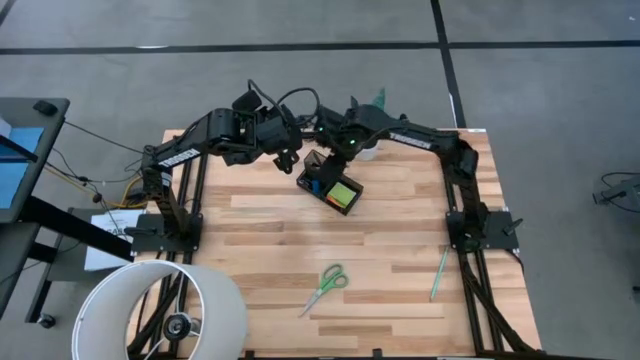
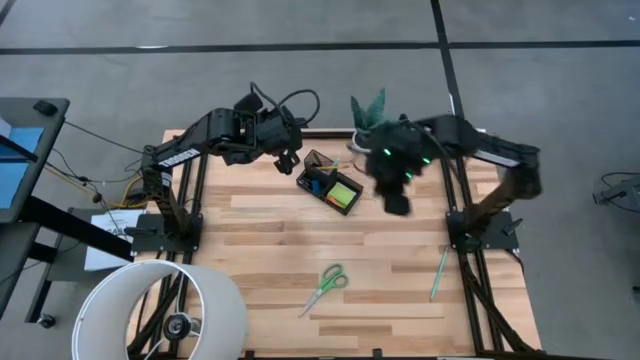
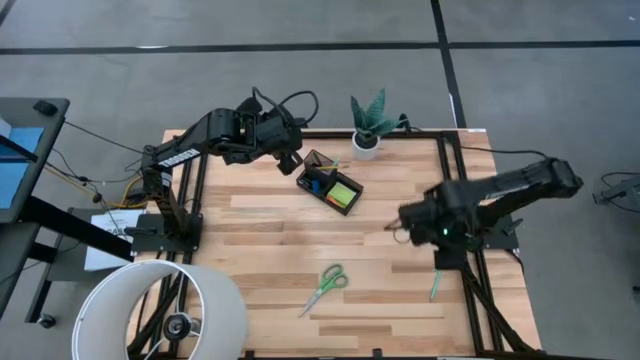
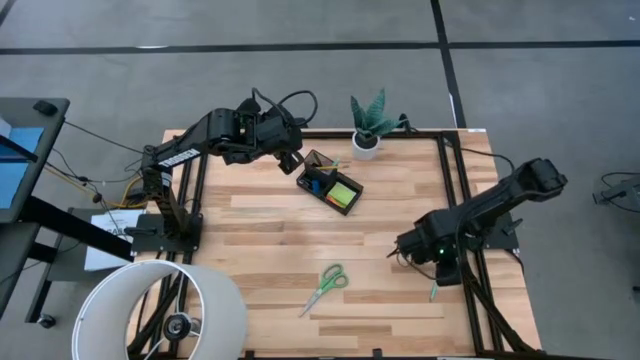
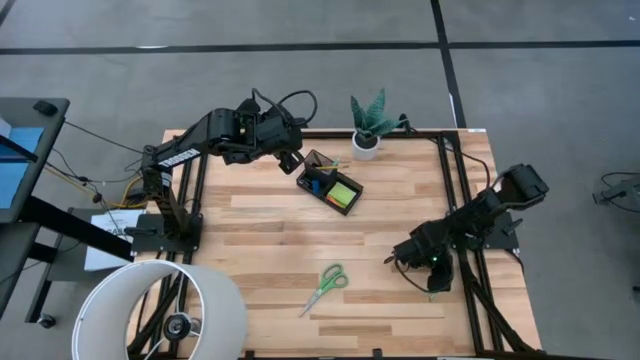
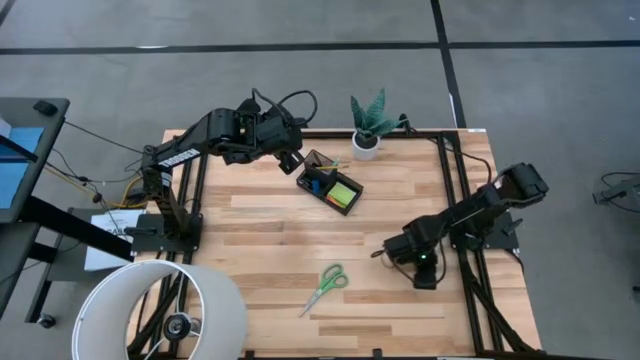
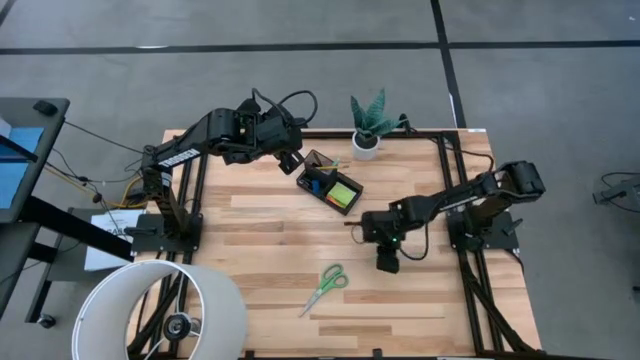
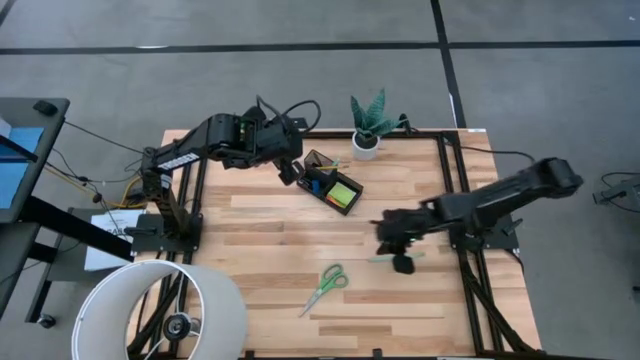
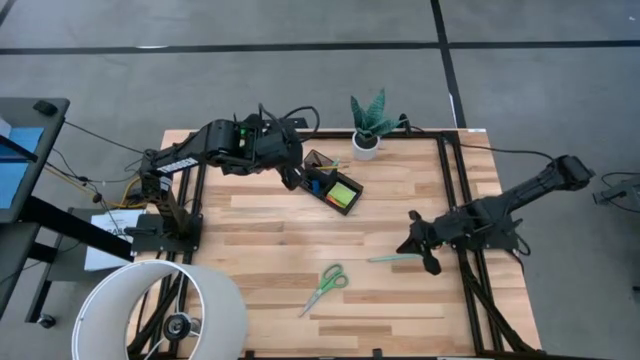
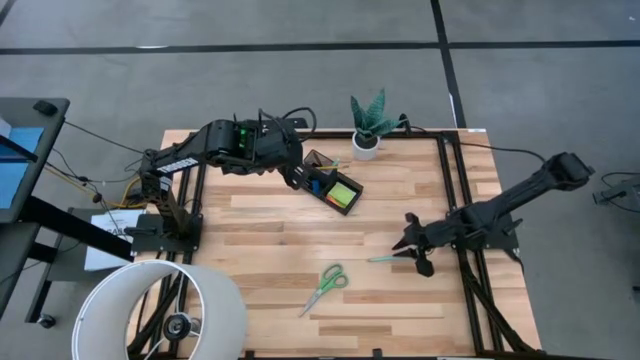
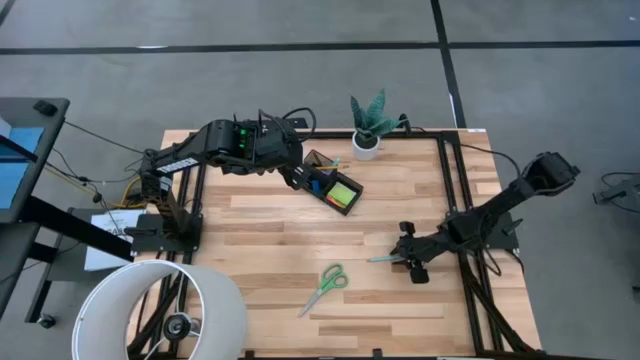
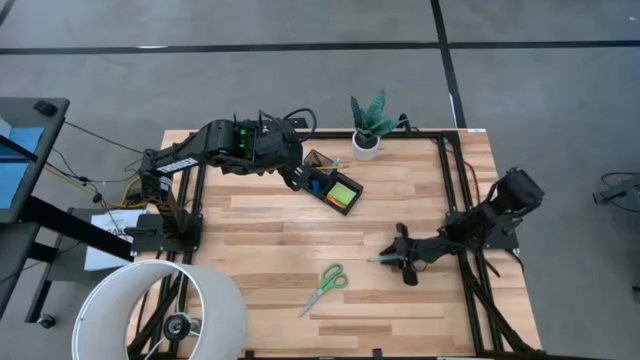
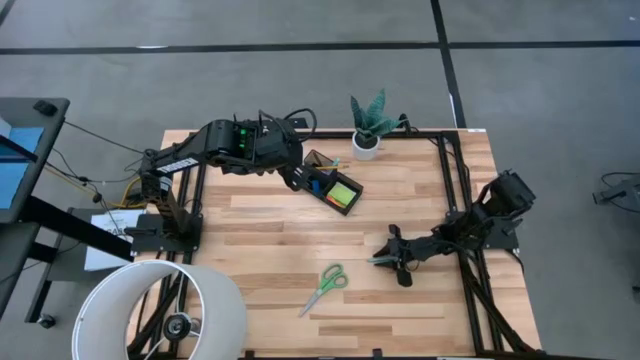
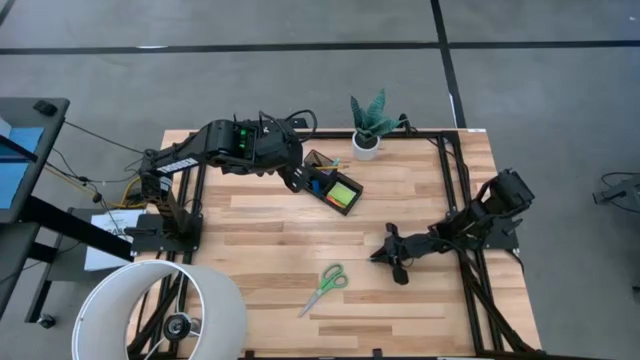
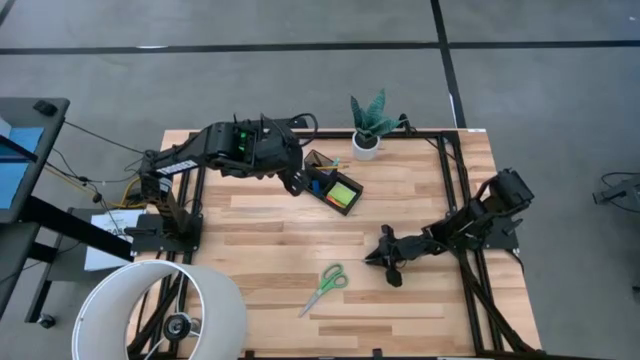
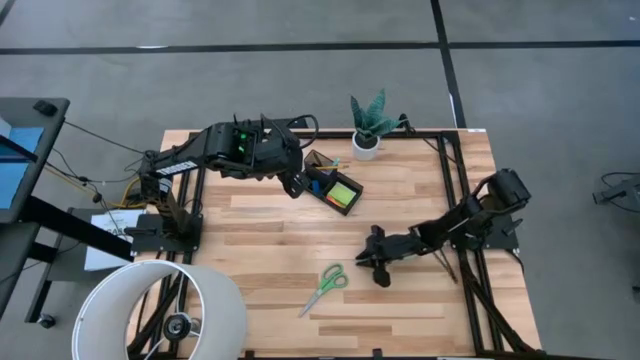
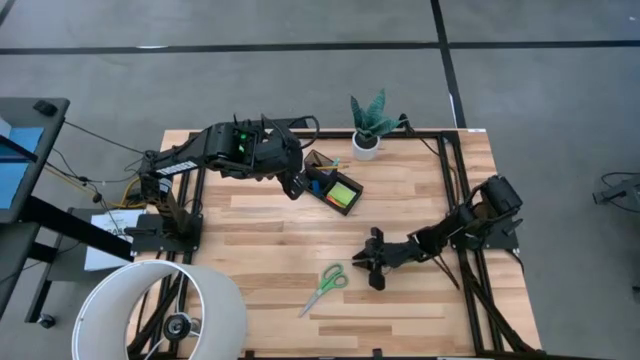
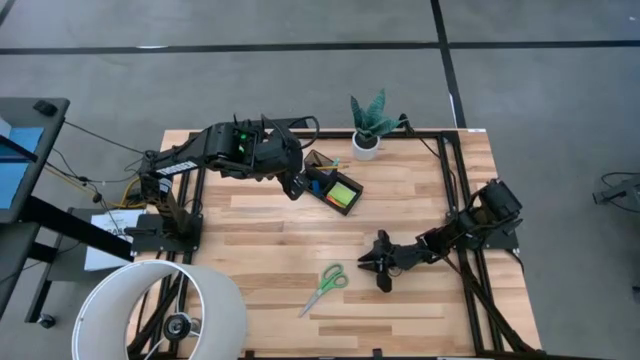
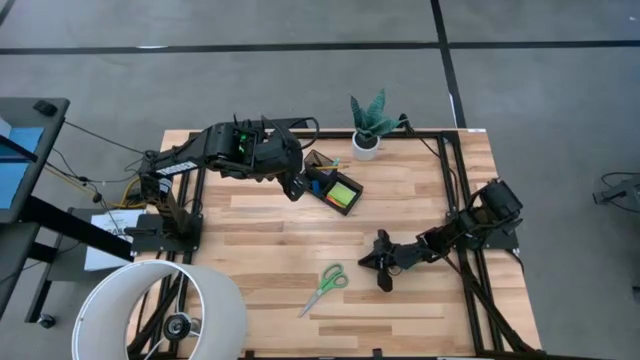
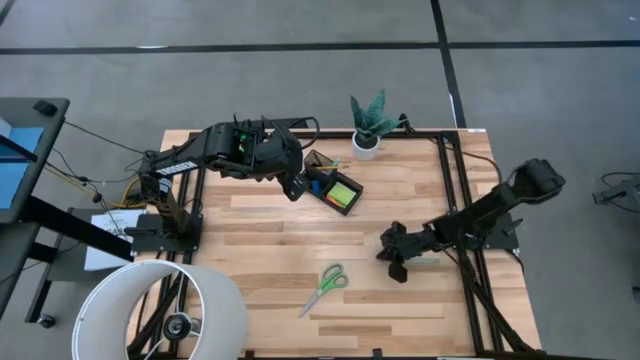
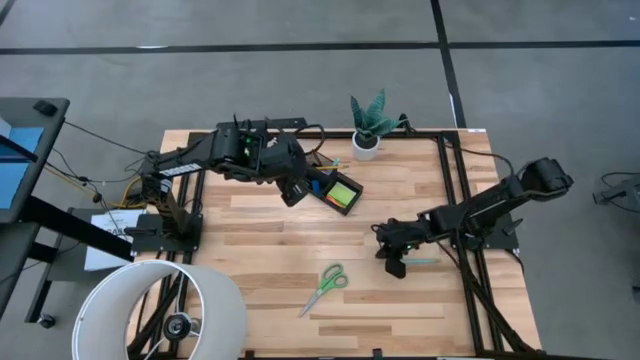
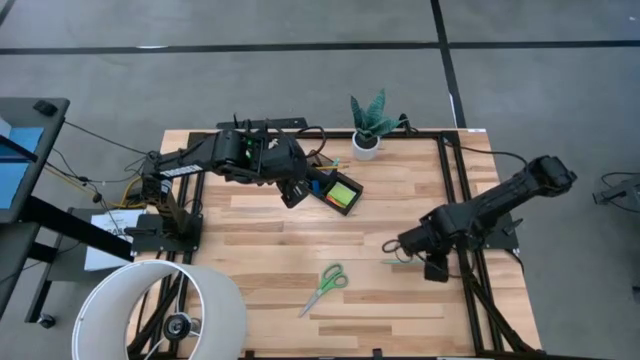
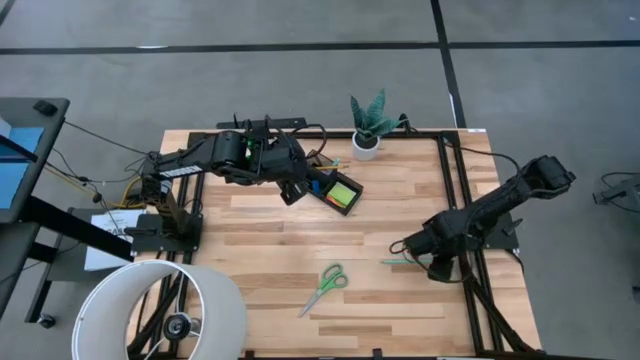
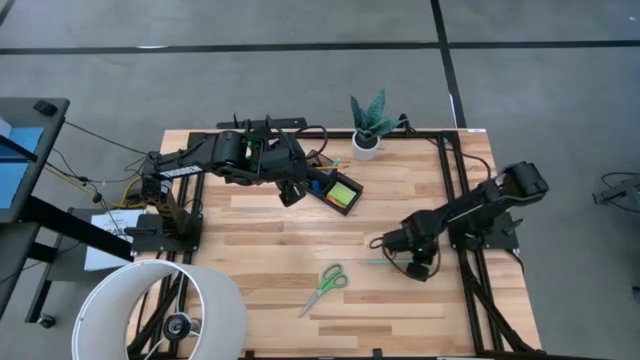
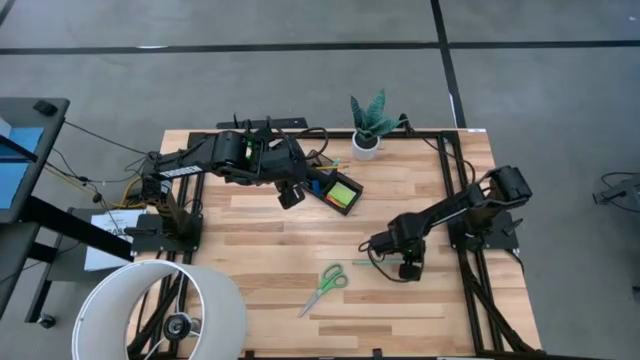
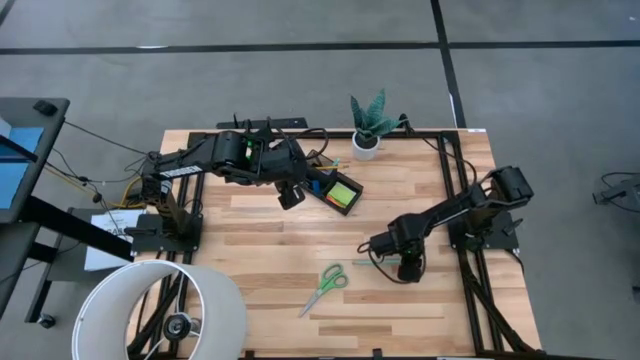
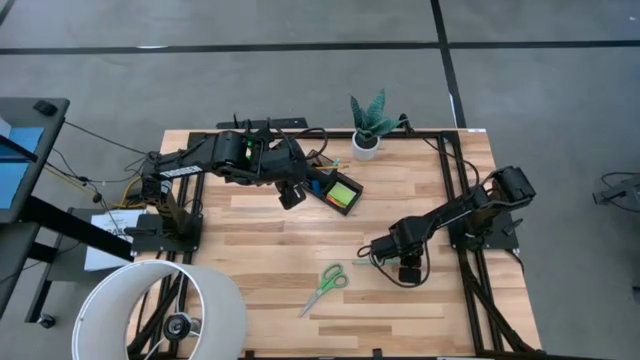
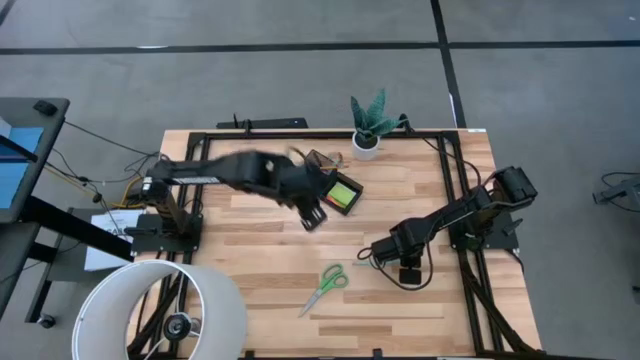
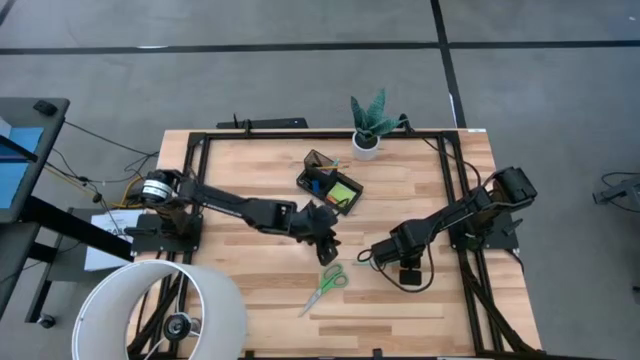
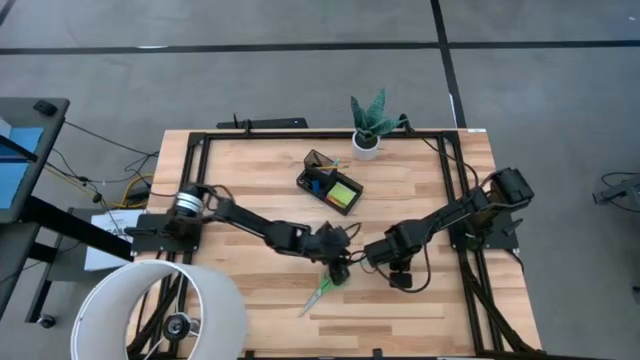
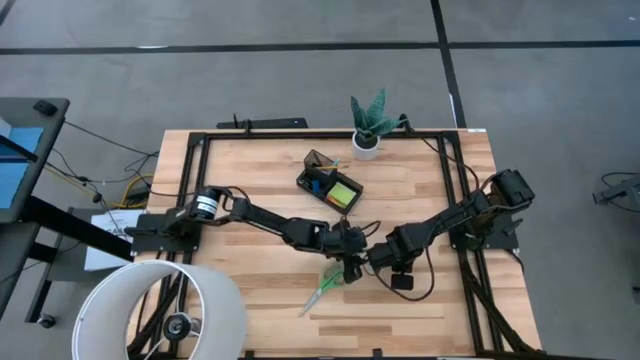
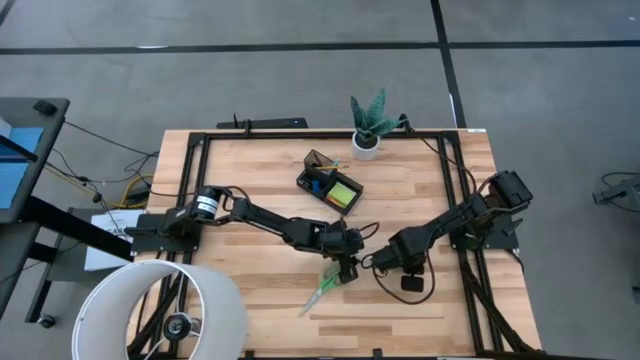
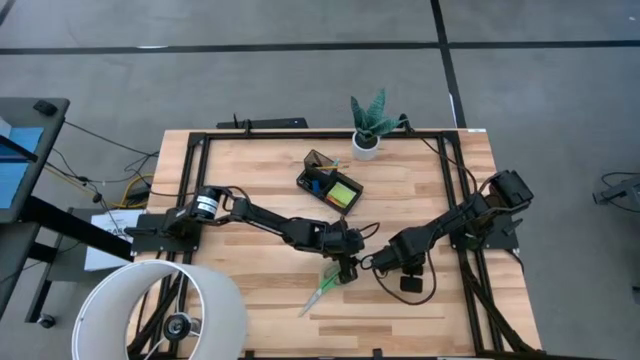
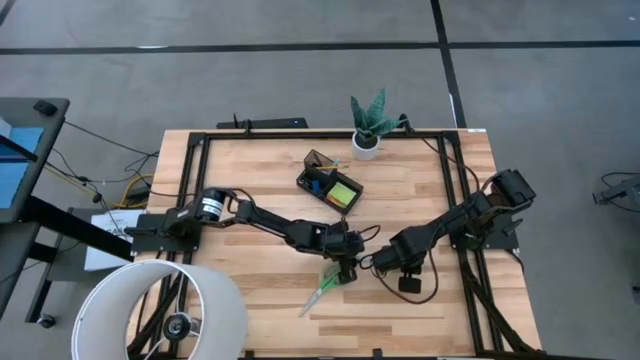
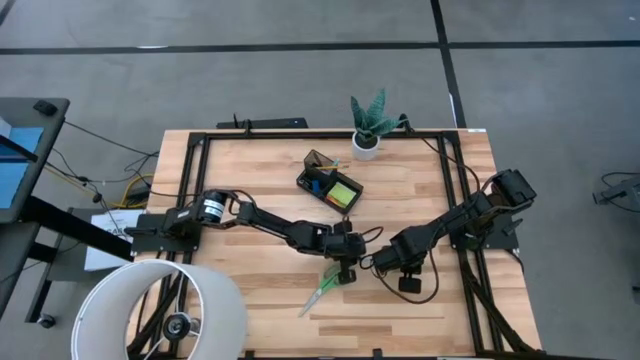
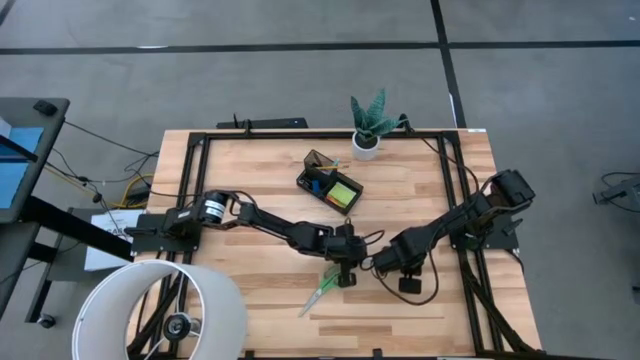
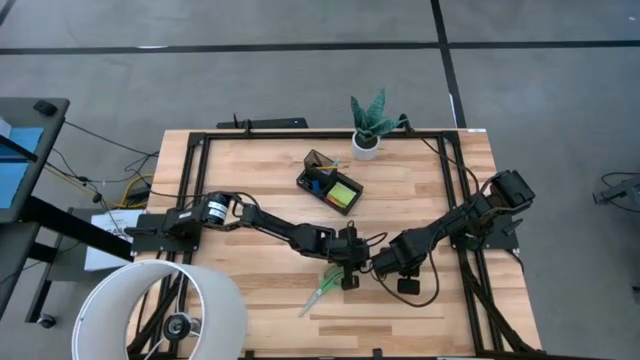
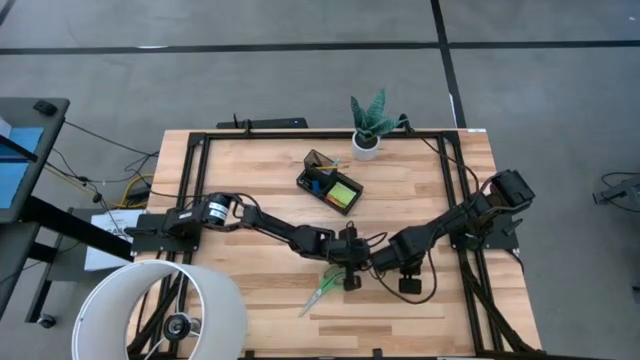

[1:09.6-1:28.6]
Task: Pick and place office supplies into organizer
Put the light blue pencil into the black desk organizer
